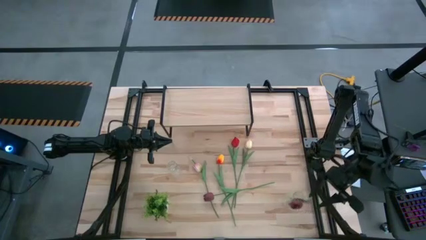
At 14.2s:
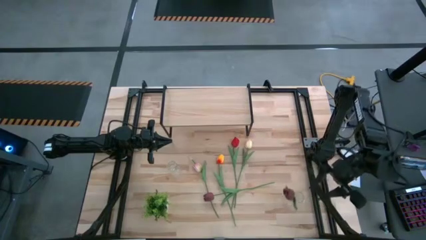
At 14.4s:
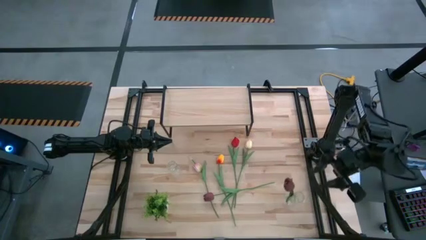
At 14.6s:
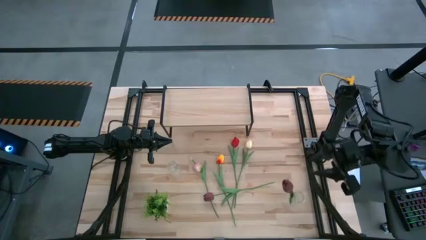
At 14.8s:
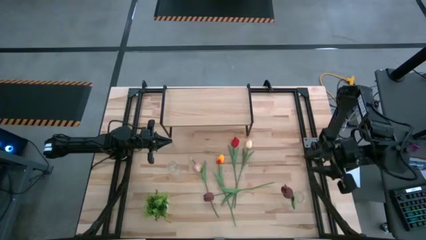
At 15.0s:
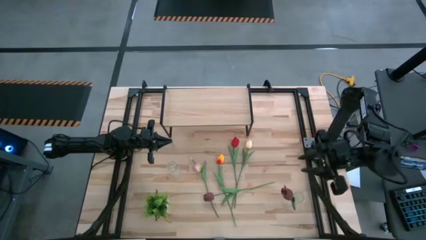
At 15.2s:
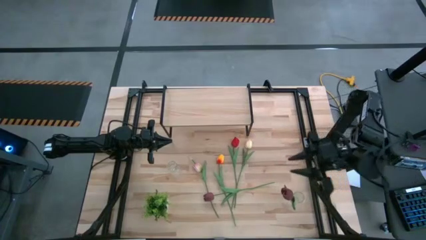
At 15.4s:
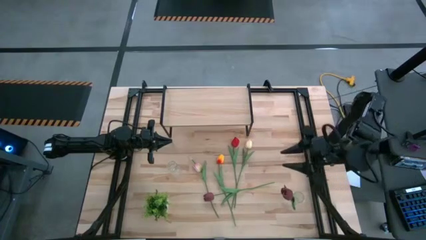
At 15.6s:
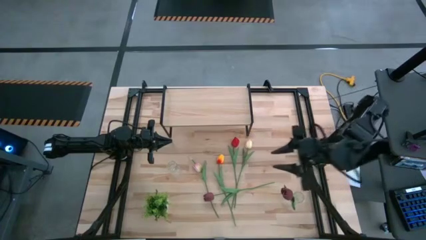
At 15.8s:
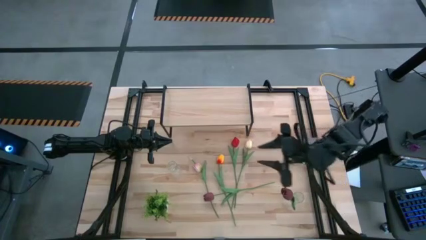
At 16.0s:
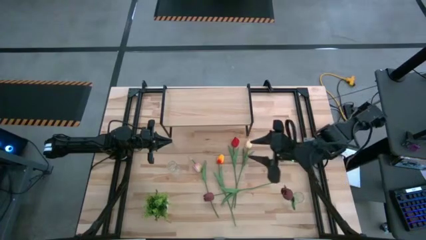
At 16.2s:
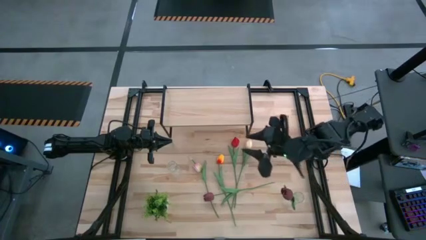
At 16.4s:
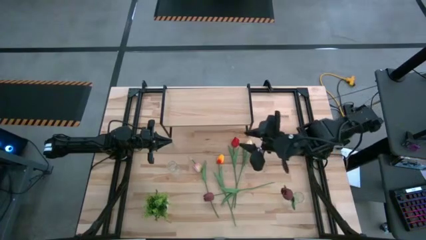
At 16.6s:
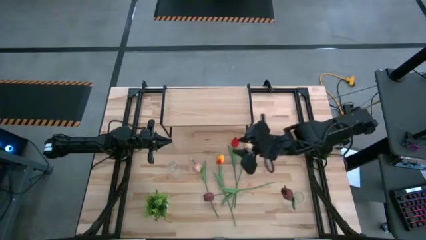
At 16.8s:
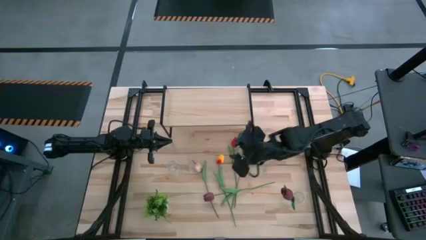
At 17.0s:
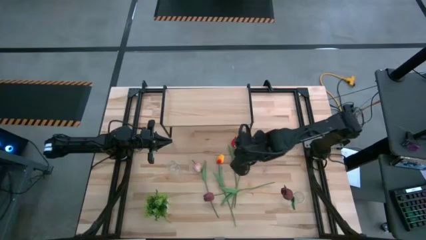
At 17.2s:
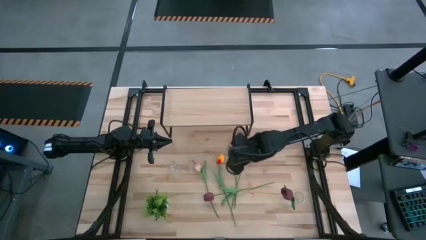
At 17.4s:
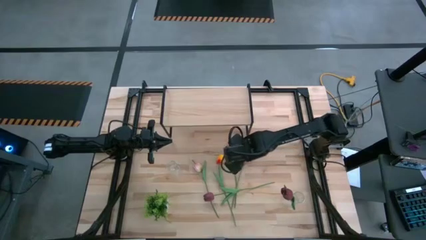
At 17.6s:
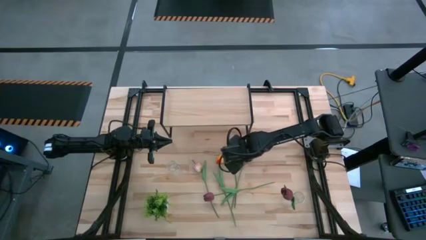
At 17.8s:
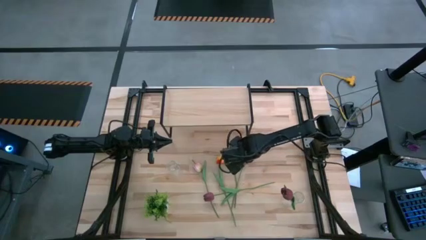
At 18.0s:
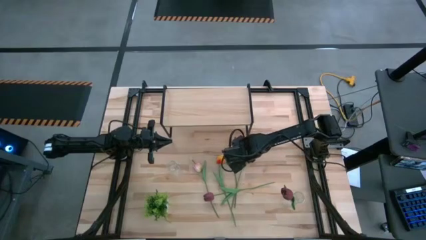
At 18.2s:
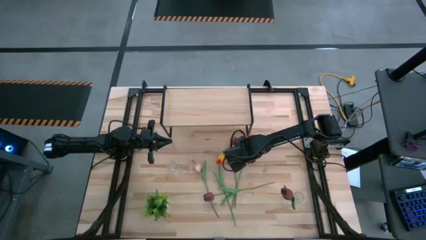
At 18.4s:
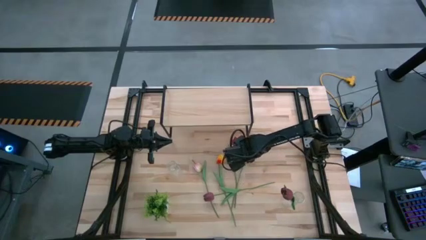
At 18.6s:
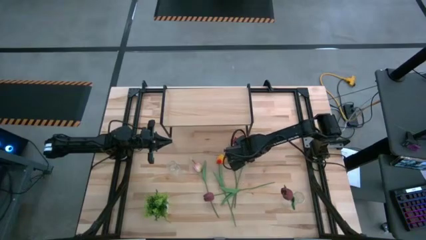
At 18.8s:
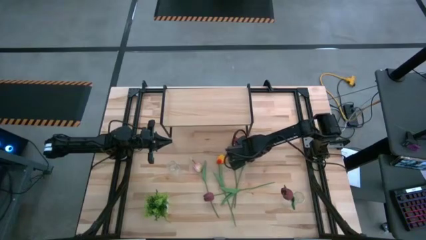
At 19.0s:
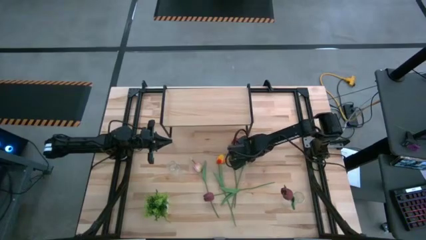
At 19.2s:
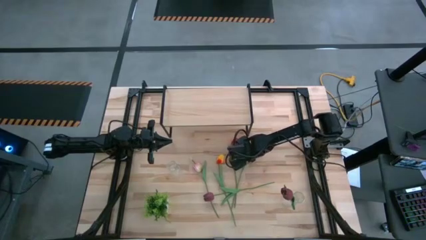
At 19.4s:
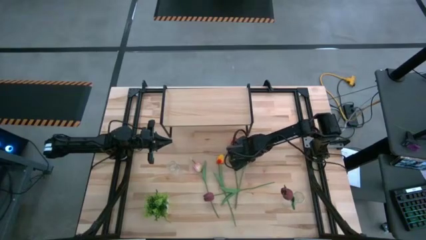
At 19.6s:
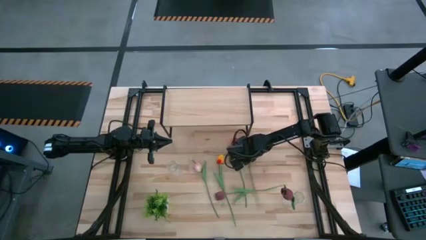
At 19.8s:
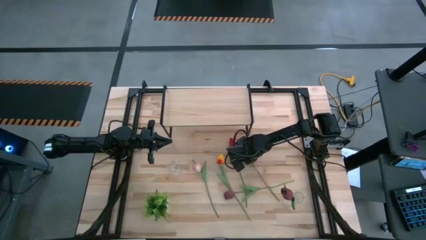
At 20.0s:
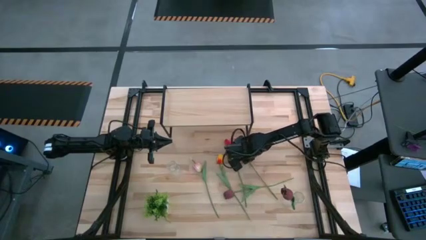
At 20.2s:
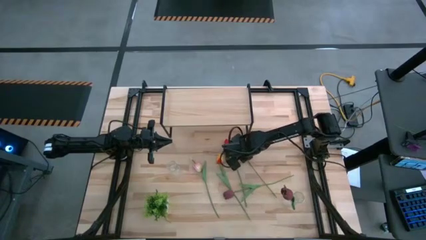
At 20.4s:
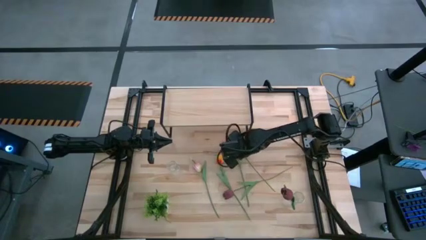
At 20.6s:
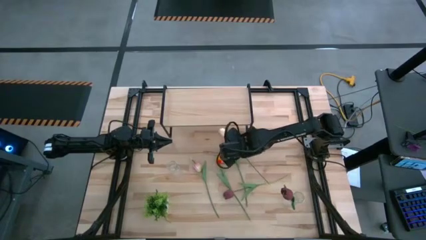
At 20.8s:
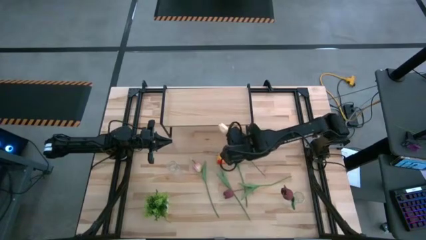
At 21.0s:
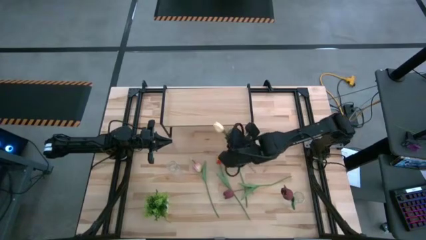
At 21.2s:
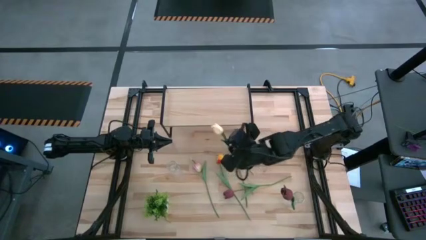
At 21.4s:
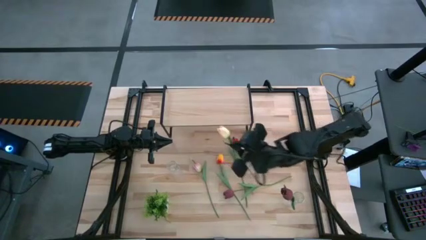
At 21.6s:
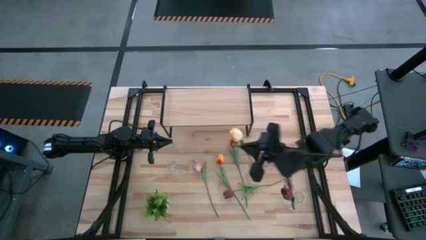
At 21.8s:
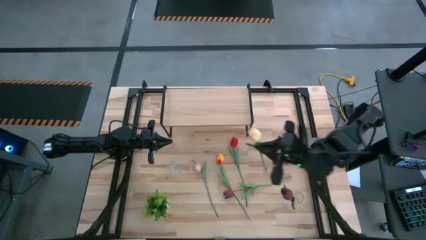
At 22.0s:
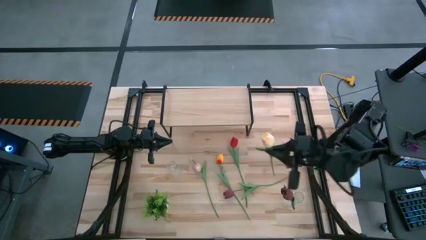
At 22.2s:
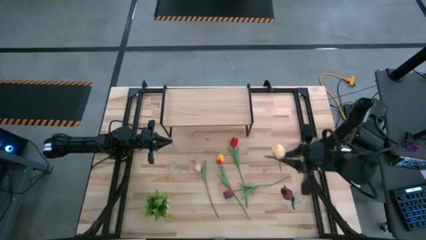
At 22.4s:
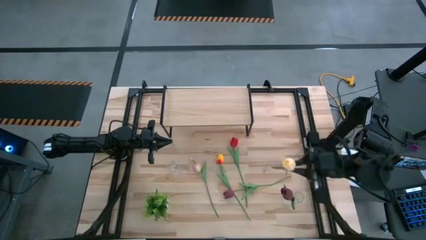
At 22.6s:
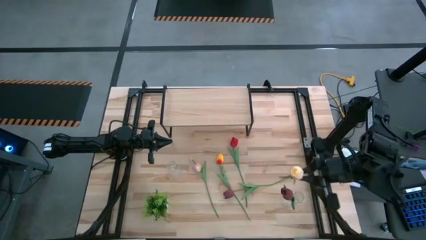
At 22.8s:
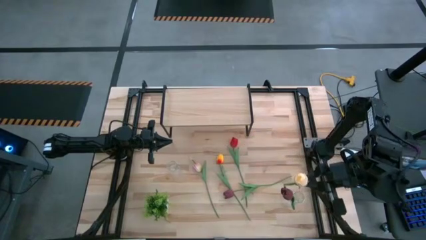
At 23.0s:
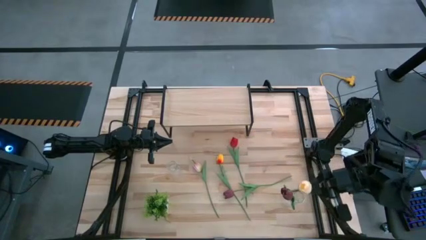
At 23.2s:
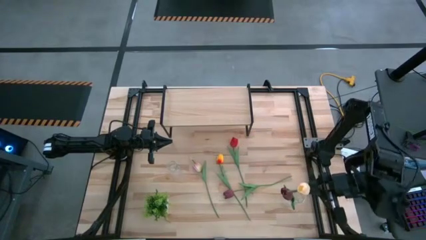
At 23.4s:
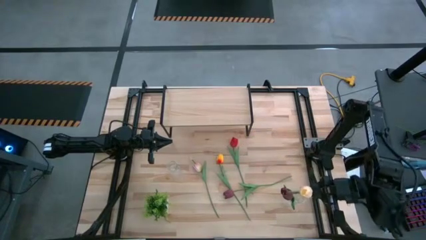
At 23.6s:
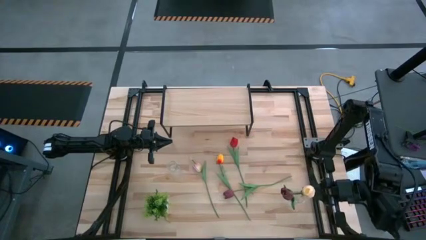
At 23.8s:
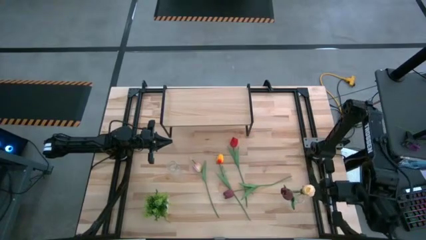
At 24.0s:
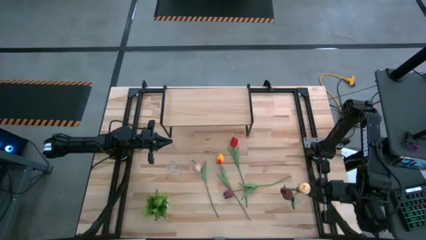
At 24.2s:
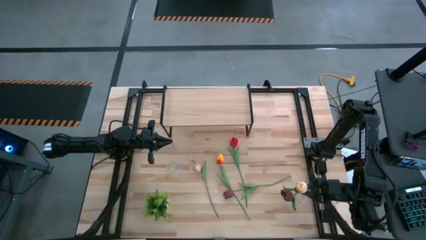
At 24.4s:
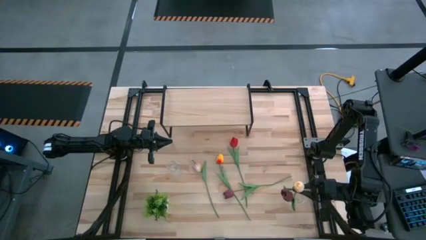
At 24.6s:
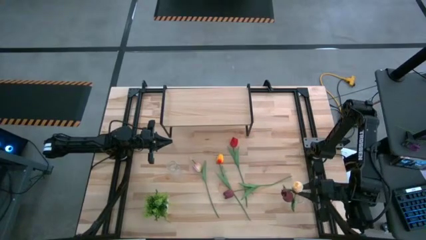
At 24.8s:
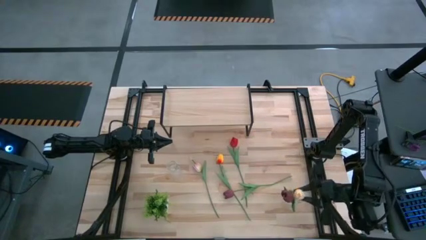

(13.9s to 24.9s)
Task: Pick and place flowers into a vace then onto a shelf
Put the white flower into the right transparent flower vase

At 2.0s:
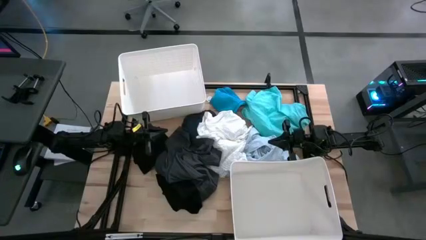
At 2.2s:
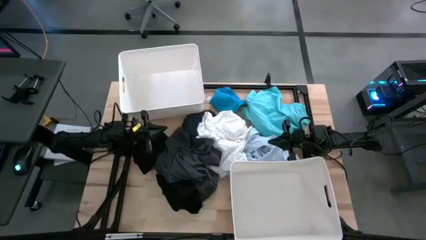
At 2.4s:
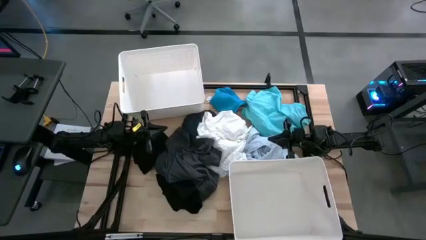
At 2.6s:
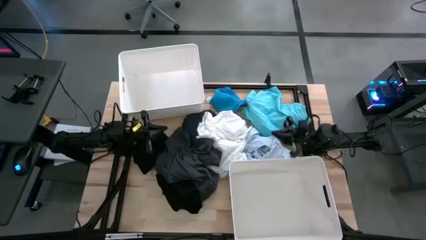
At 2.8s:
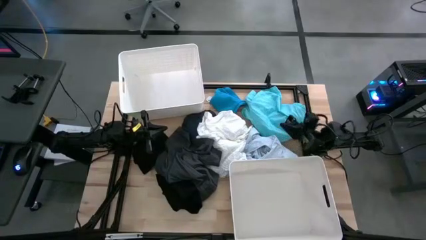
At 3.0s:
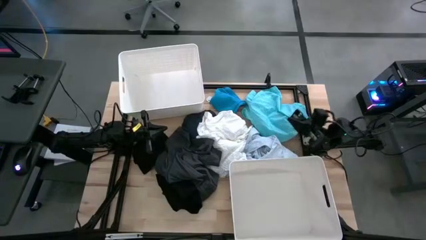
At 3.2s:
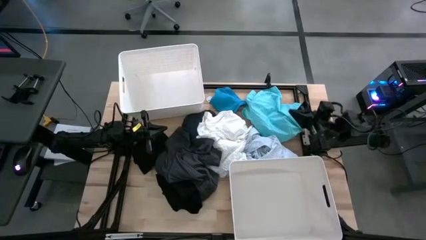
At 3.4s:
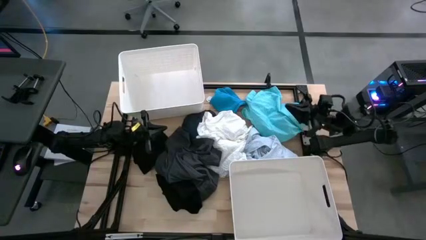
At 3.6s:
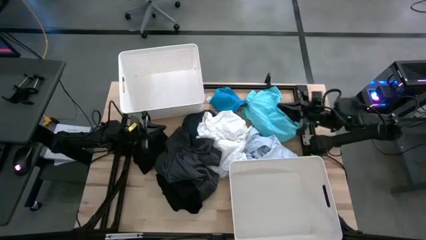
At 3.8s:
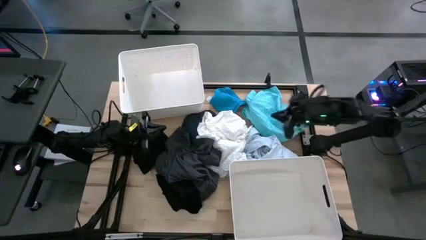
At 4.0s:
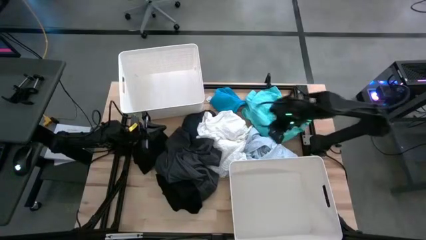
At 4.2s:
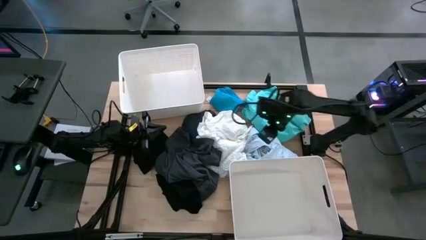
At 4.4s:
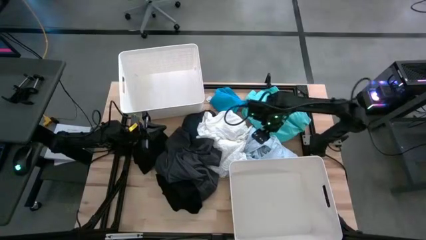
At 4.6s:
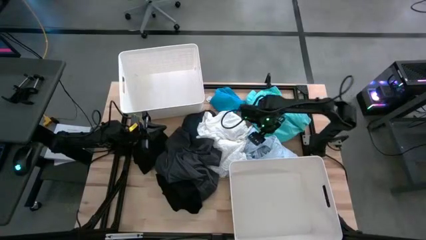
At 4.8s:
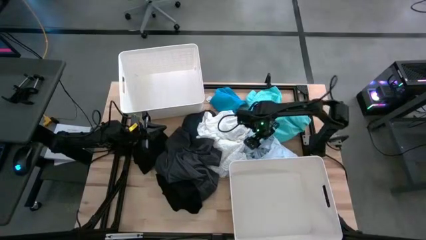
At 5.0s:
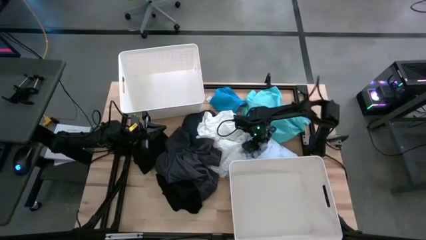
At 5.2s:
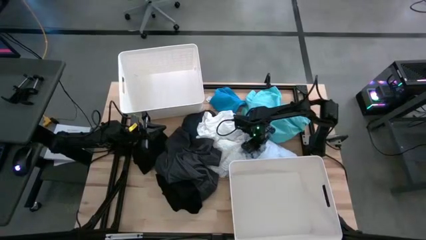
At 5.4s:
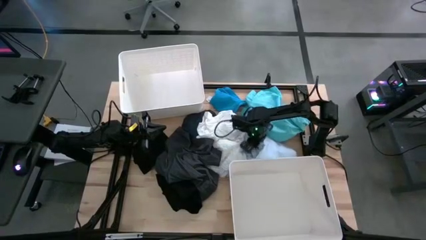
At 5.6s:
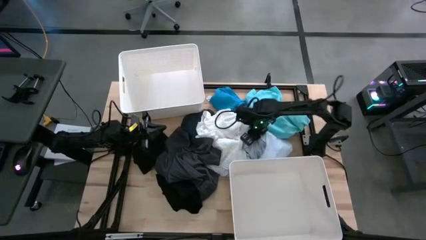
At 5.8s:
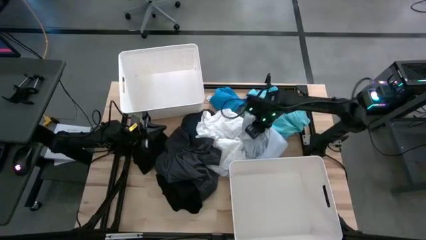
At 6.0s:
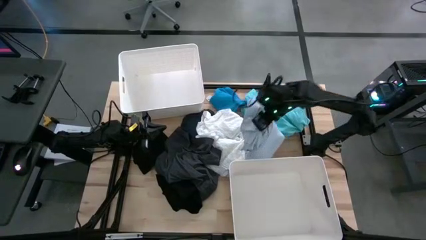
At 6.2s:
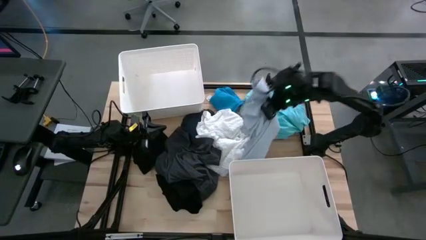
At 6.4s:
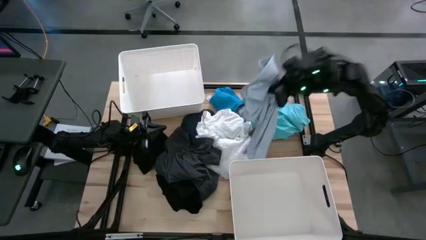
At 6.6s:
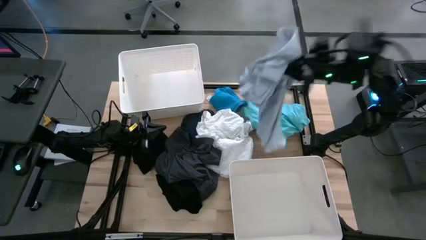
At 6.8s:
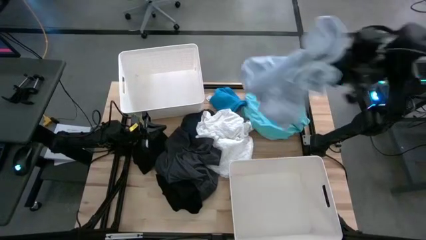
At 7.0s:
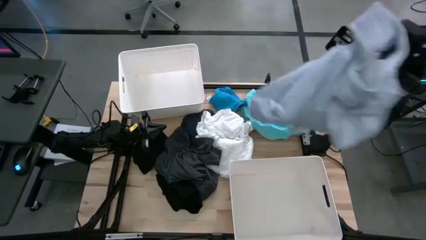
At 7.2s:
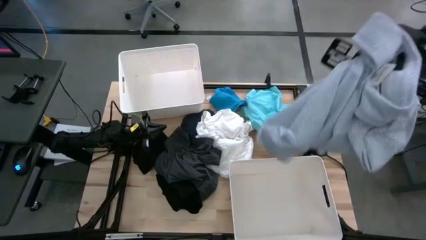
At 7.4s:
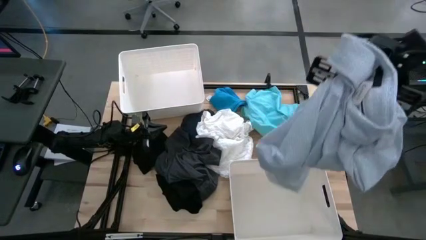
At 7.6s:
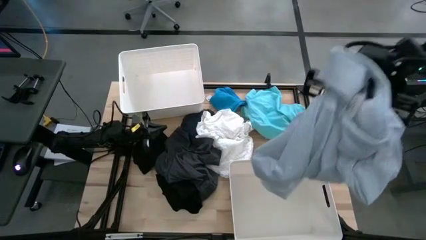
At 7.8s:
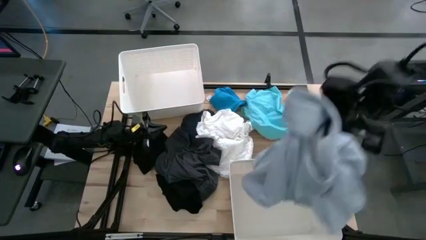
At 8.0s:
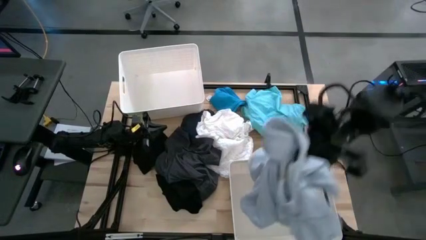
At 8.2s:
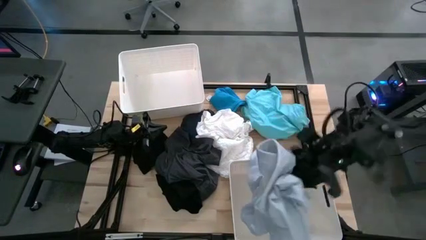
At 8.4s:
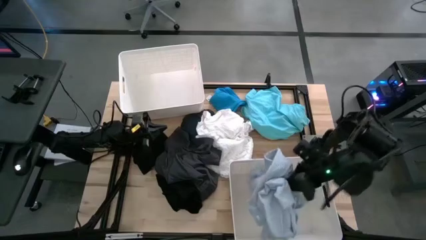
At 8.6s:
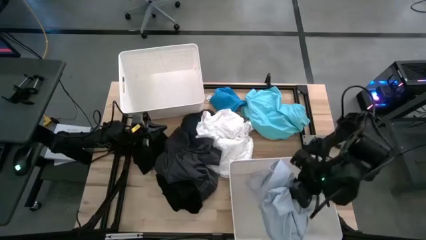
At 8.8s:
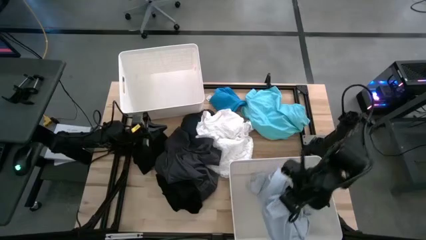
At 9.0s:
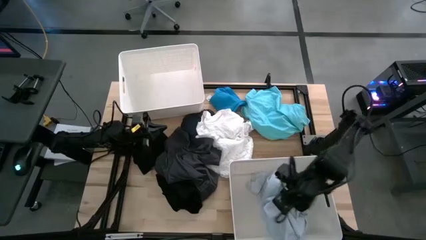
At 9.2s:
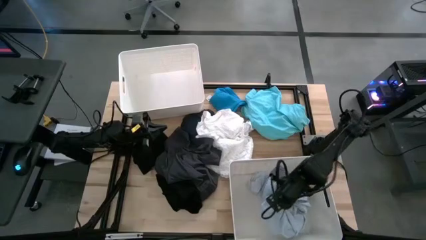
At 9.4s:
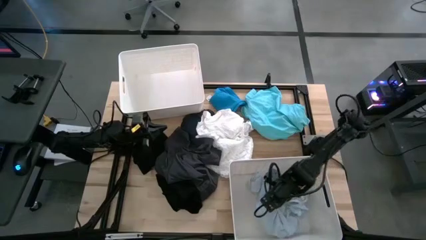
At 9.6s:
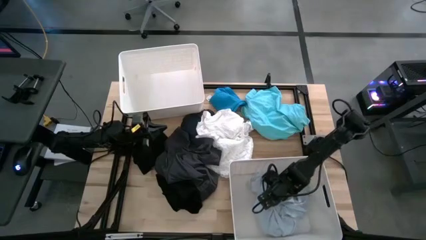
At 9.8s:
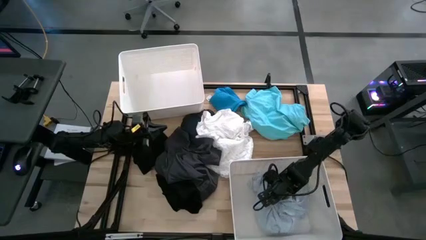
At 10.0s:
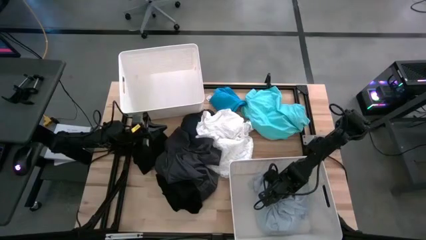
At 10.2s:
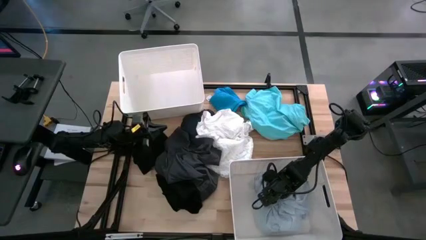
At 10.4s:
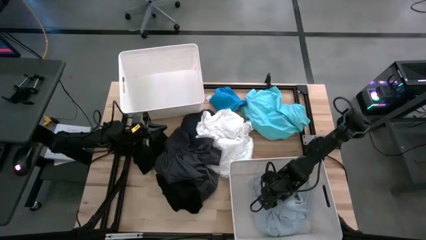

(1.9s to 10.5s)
Task: Sort clothes
Put the light blue shirt into the bottom white bin
